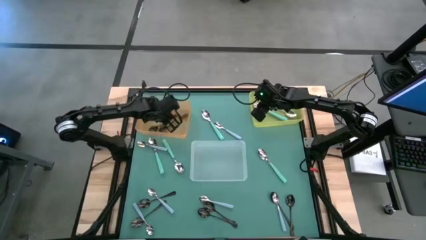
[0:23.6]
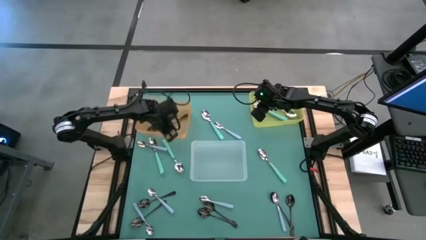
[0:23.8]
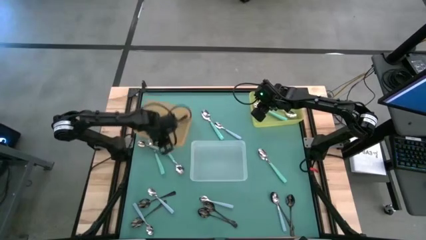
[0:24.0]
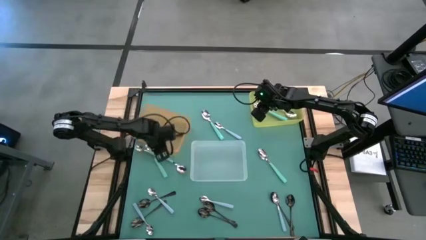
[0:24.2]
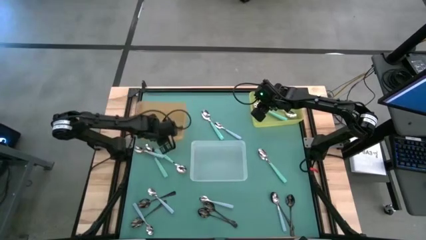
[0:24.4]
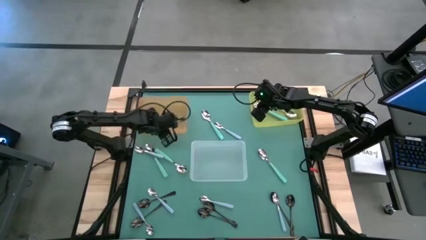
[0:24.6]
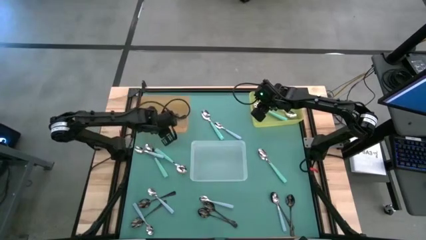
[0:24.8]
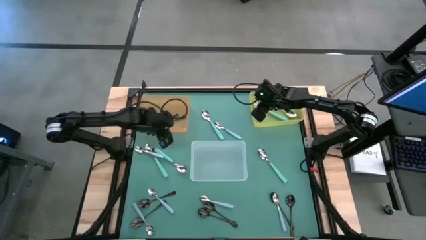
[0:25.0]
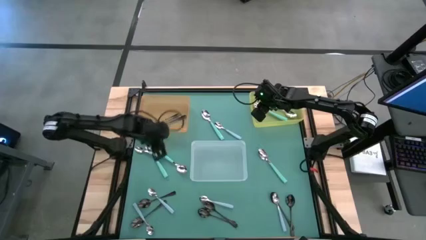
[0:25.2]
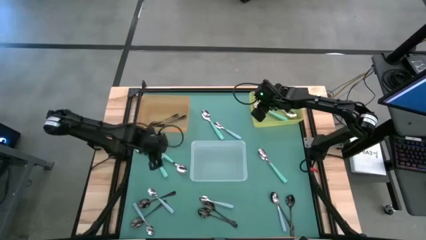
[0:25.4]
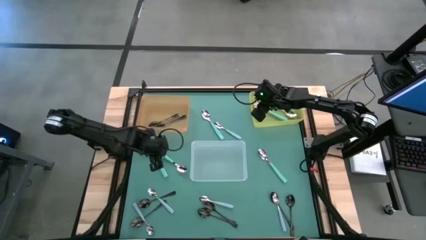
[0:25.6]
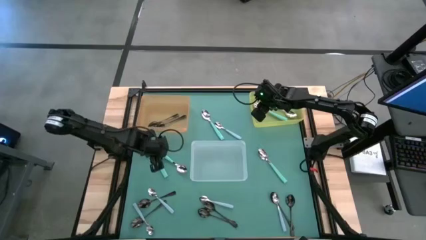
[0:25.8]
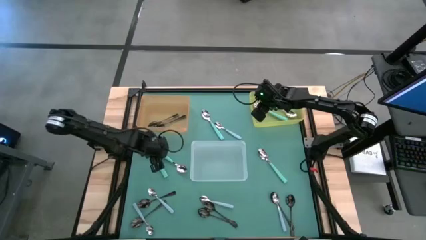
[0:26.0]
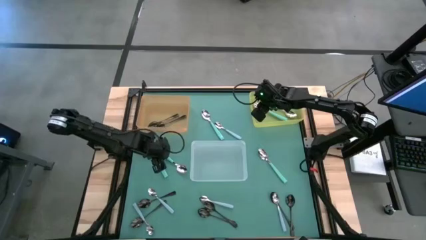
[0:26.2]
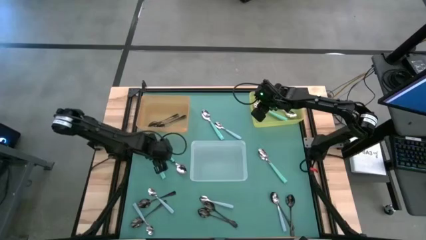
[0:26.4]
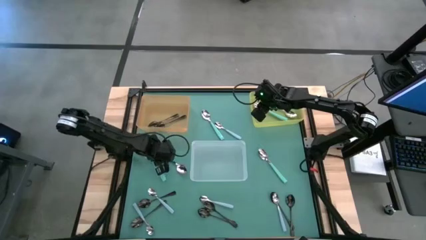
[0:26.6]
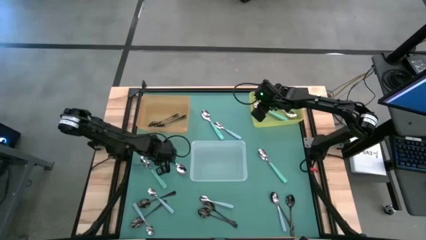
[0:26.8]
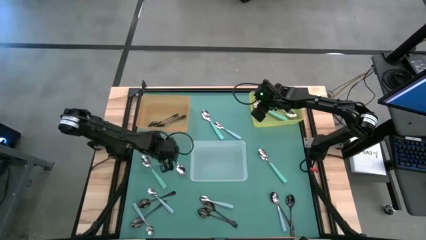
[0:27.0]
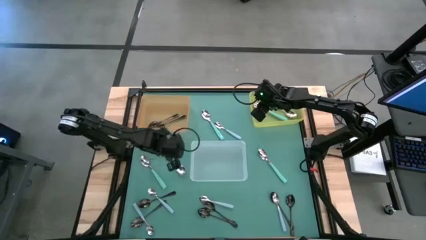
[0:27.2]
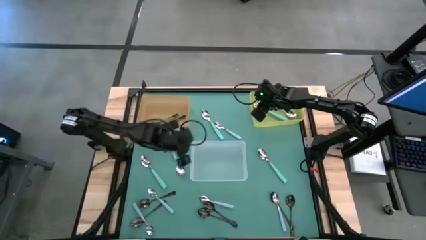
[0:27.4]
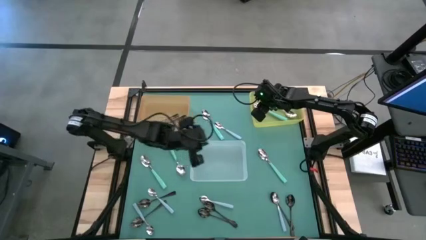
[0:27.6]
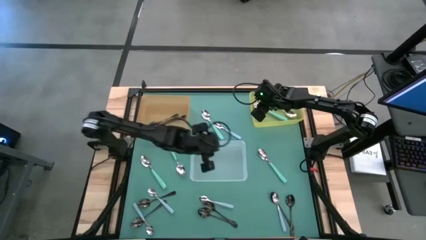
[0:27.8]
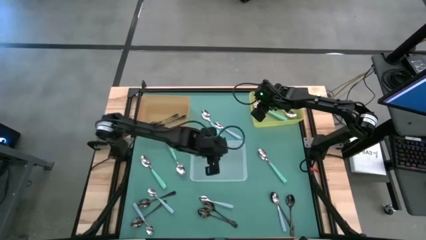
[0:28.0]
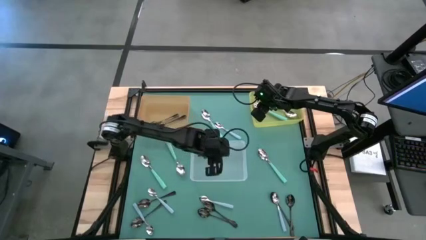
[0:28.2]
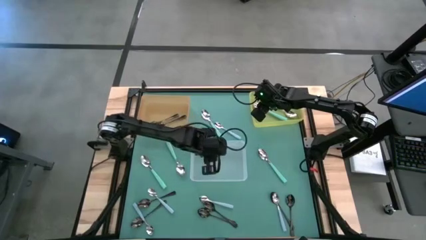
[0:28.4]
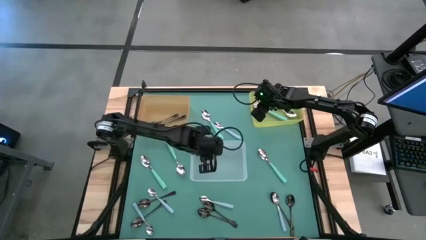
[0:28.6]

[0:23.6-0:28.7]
Task: Sort silverware by color (type)
Put the blue spoon into the white bin

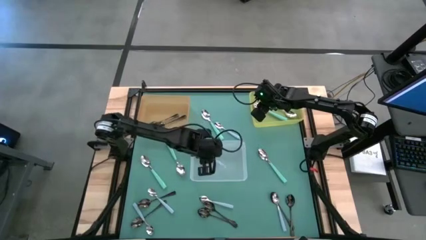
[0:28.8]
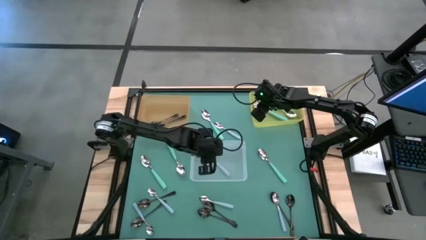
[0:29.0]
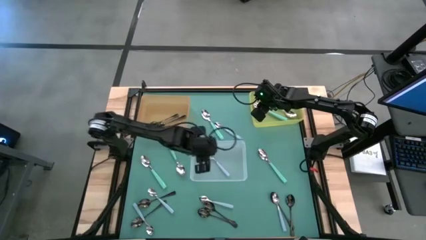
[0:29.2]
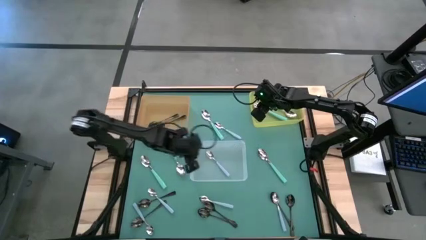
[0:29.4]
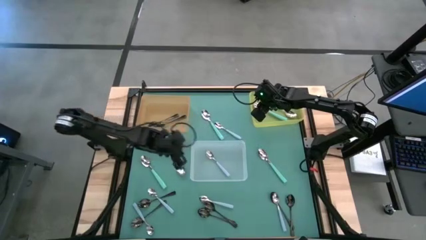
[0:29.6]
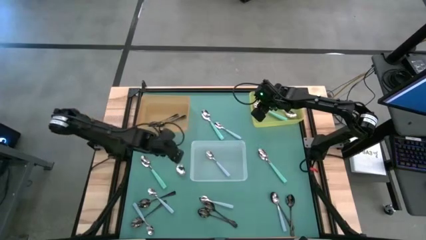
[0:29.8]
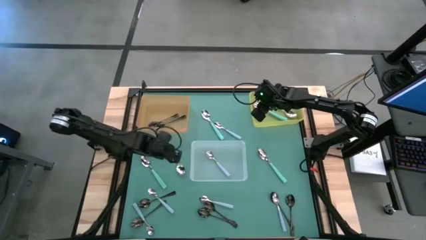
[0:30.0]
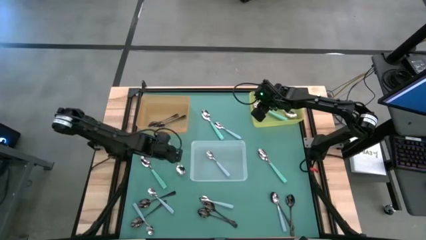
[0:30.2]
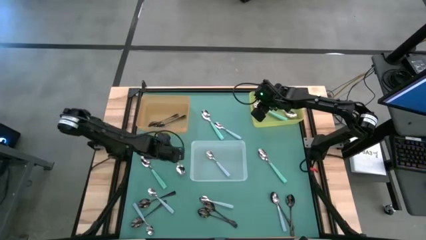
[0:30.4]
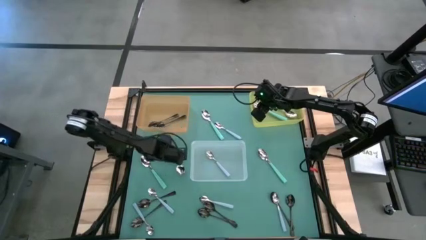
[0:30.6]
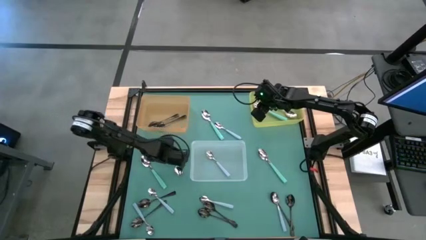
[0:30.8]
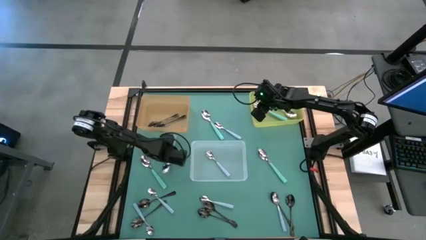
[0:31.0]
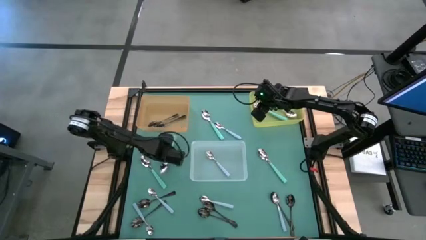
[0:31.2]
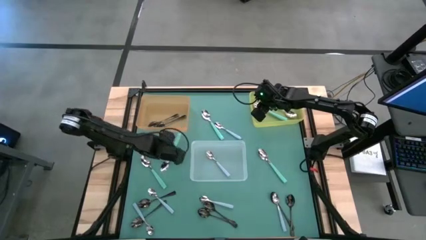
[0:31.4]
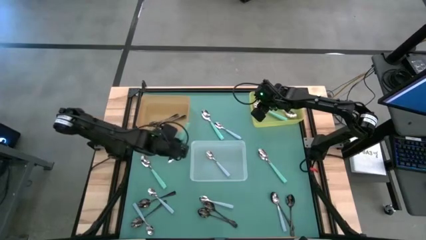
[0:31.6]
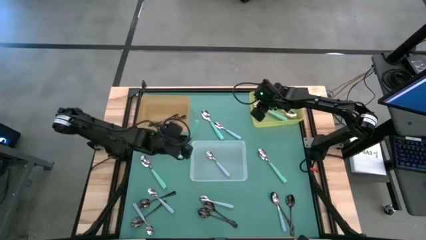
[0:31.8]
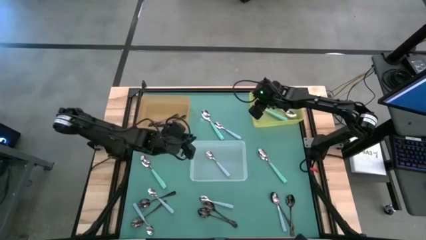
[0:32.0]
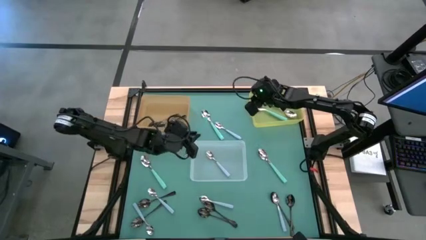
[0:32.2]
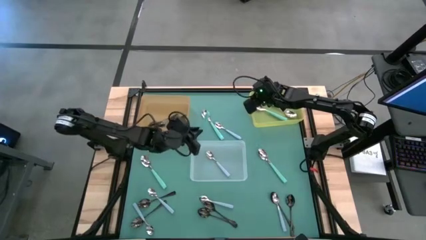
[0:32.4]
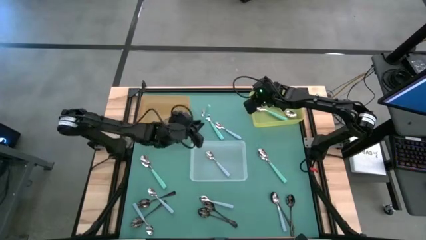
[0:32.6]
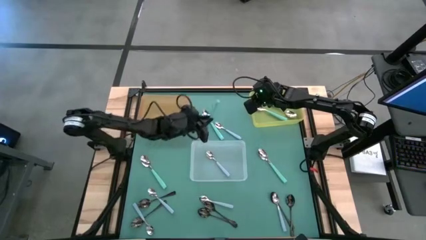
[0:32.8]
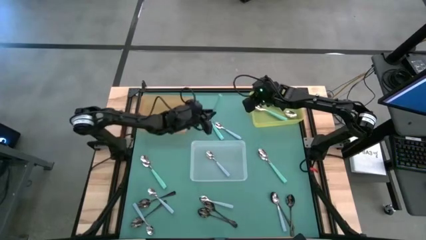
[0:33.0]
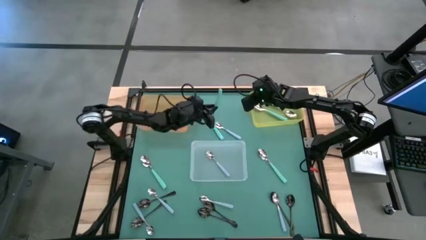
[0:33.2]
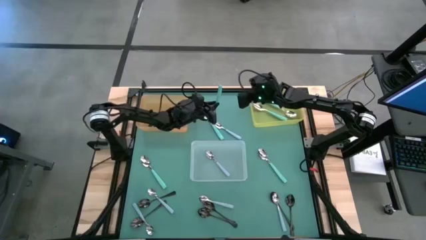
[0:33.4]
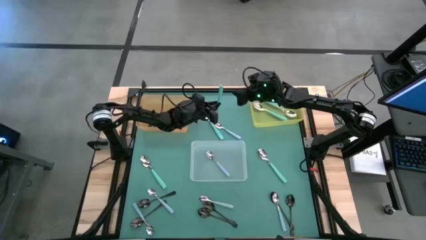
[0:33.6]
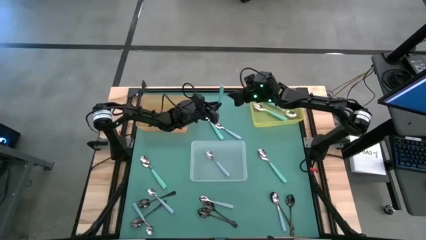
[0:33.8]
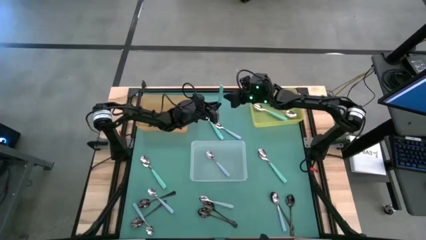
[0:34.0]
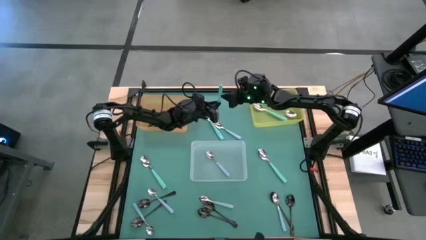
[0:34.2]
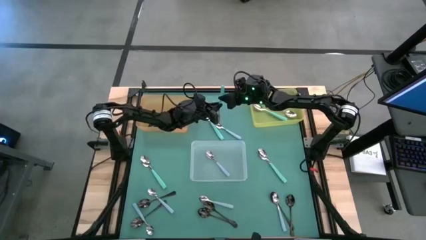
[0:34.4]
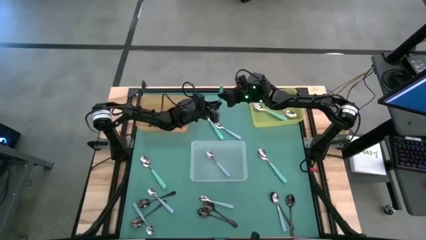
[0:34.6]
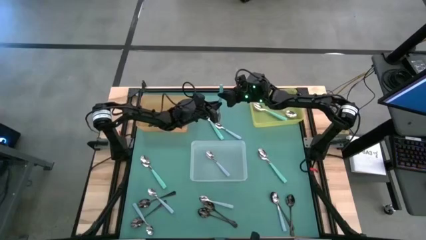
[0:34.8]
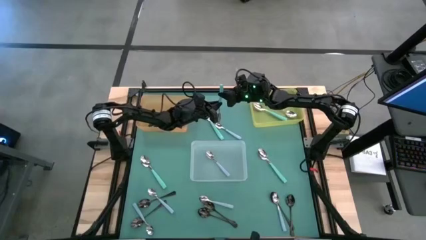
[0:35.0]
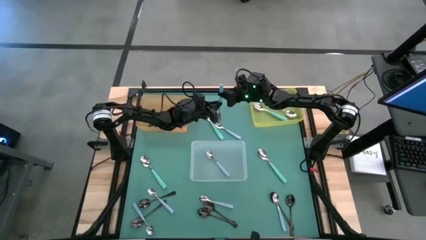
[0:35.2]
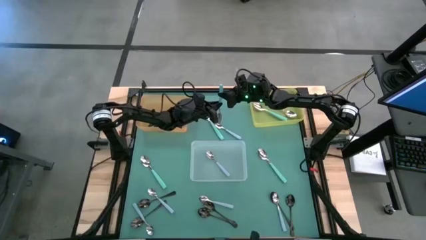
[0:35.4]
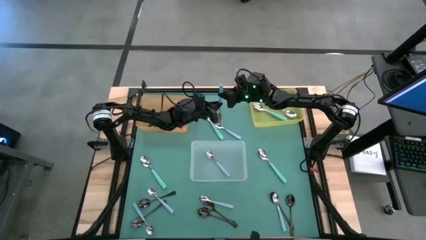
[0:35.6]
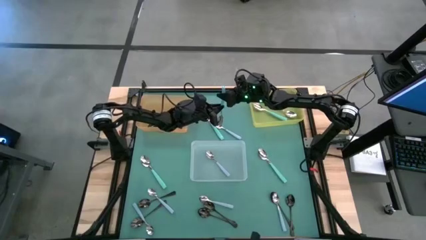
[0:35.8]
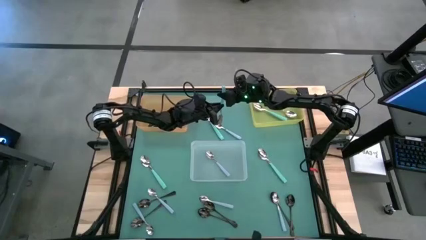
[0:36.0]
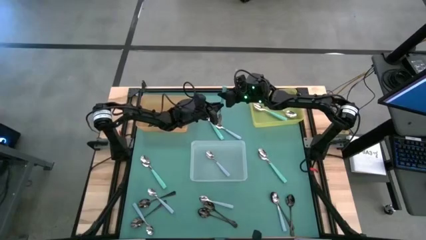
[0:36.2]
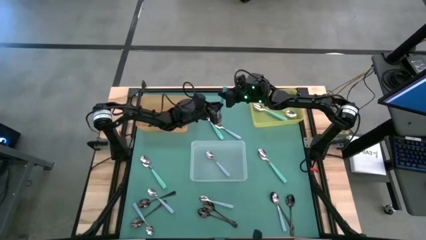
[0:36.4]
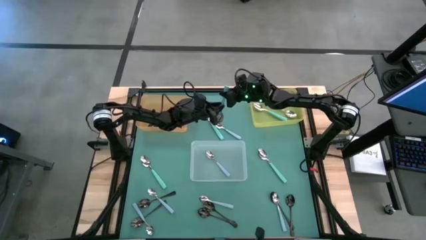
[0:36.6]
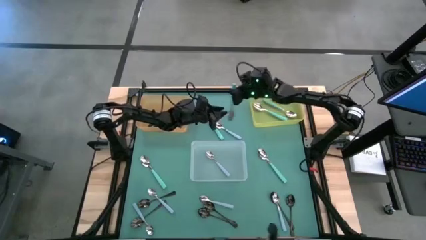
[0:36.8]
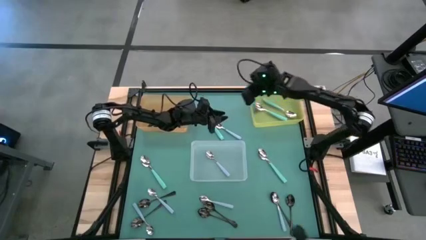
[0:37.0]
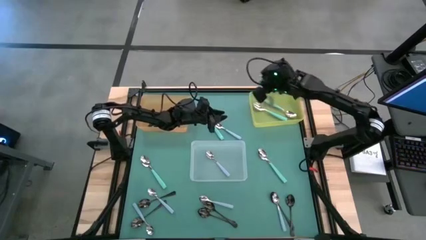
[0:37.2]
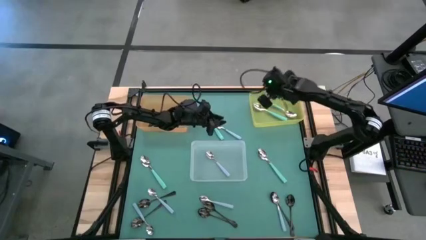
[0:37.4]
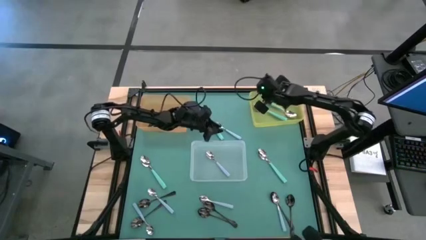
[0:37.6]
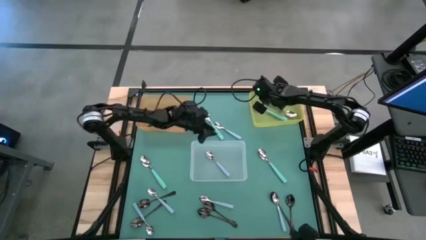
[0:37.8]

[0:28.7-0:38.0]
Put the light blue spoon into the yellow bin

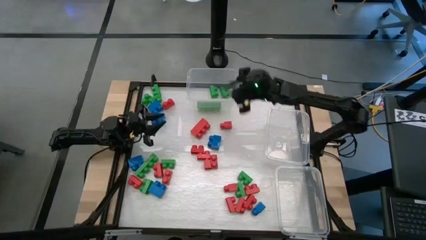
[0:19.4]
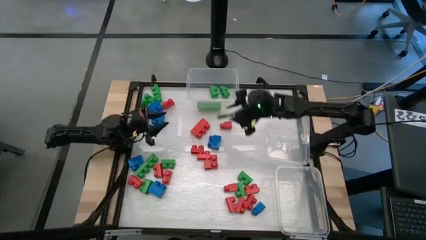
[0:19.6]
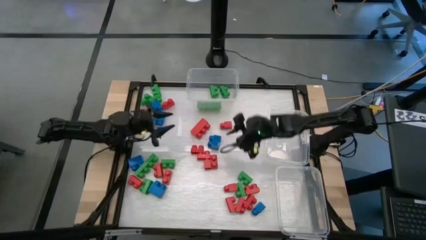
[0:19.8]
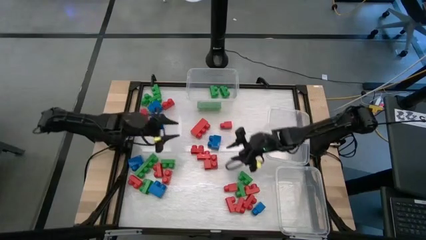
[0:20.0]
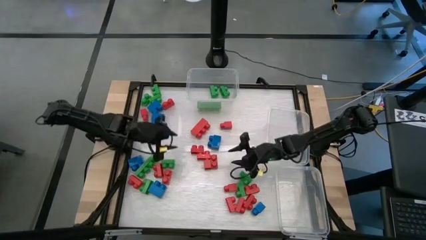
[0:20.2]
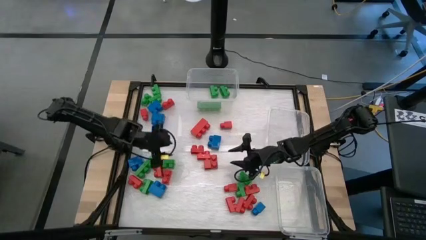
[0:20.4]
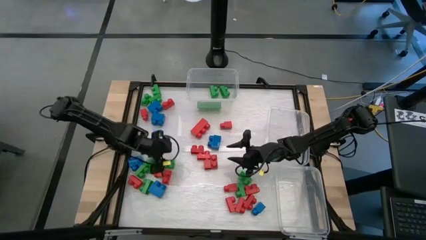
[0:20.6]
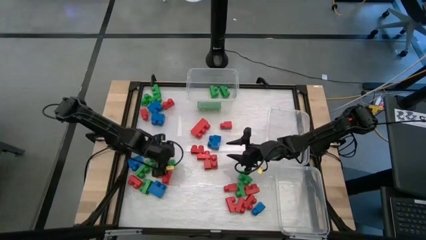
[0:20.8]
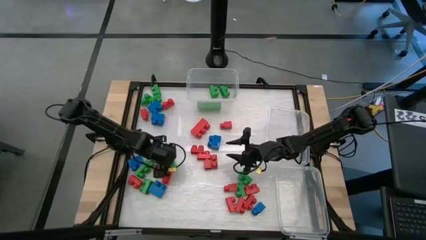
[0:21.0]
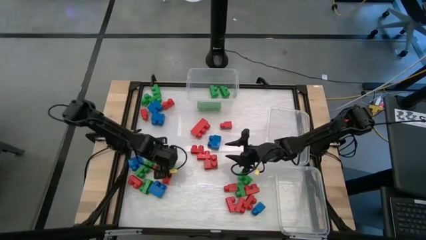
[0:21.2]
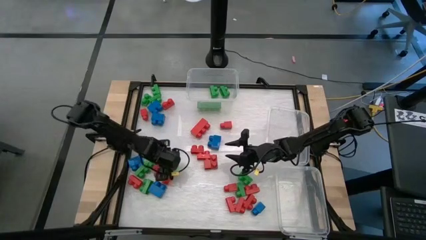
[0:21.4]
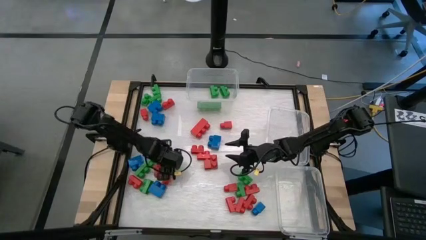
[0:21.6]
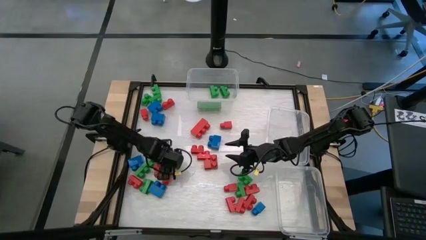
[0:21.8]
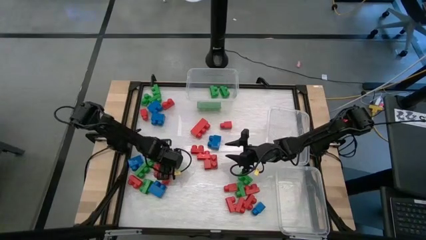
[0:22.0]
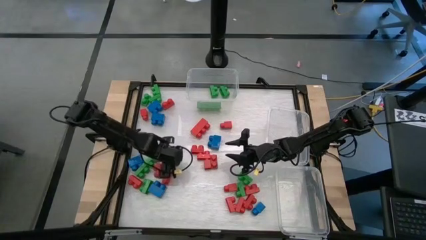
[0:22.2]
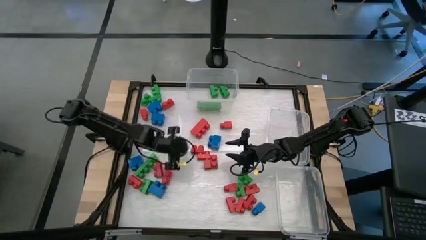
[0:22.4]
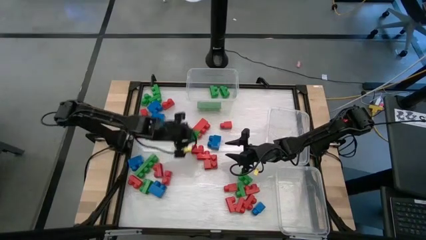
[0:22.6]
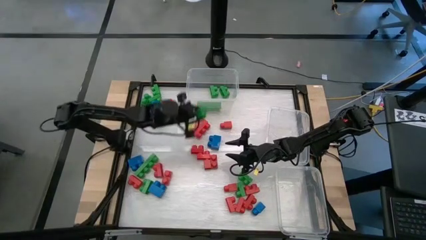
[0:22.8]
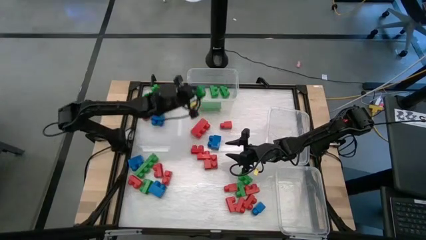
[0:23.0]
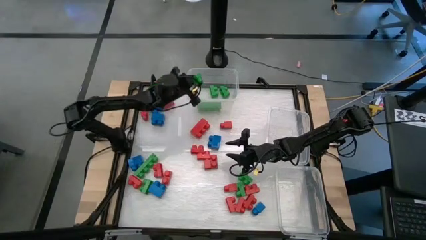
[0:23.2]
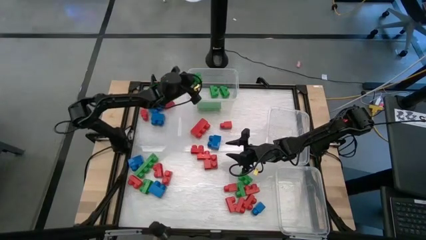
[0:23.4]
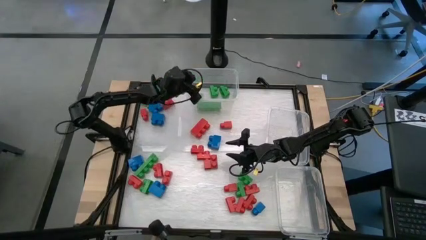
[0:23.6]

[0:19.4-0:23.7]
Task: Sort blocks
Put the green game piece into the top transparent bin
